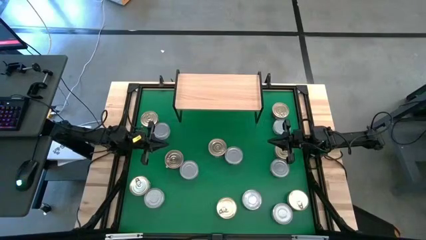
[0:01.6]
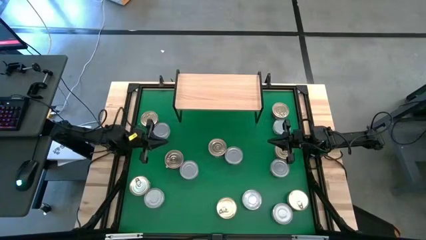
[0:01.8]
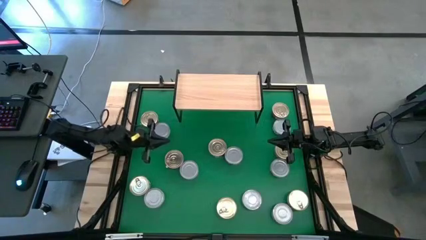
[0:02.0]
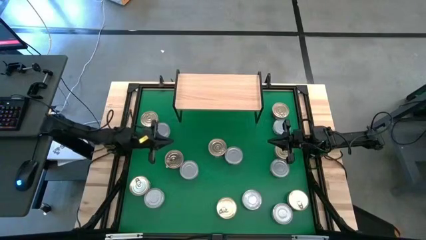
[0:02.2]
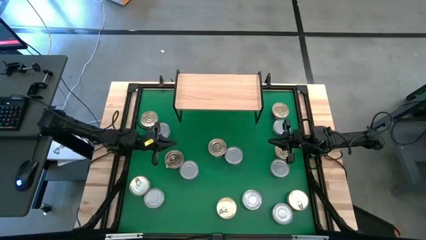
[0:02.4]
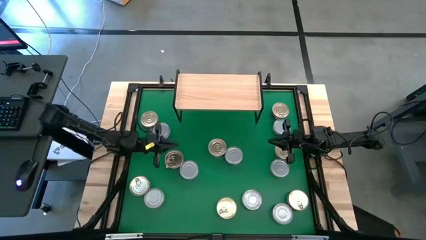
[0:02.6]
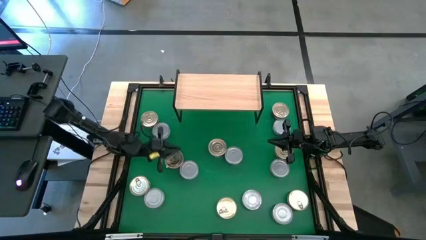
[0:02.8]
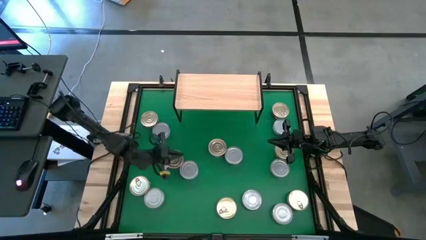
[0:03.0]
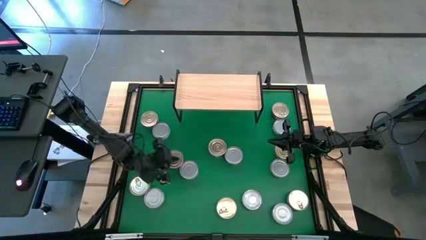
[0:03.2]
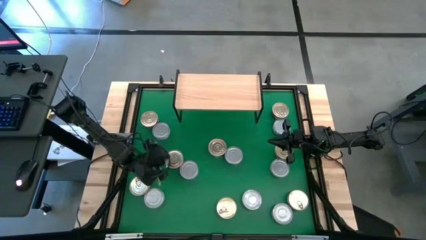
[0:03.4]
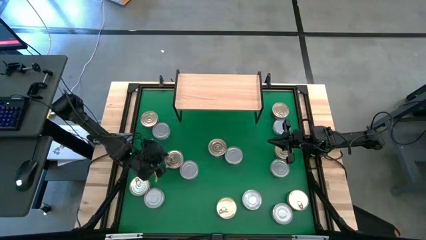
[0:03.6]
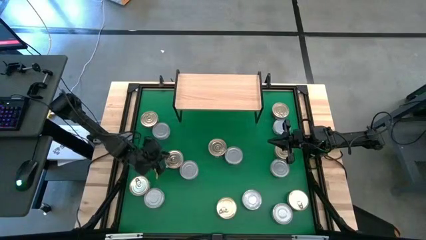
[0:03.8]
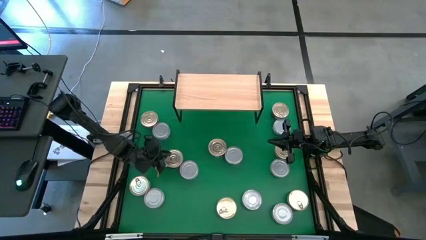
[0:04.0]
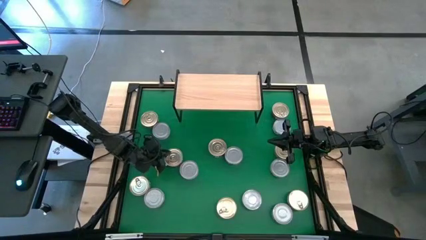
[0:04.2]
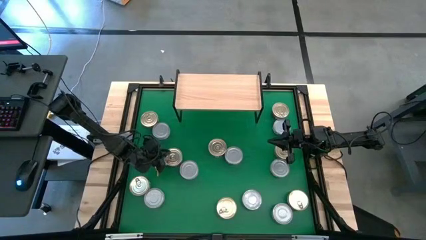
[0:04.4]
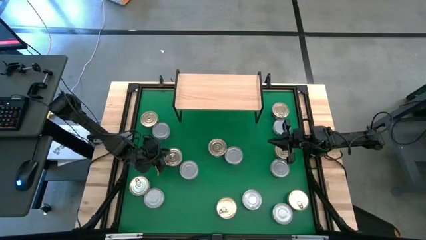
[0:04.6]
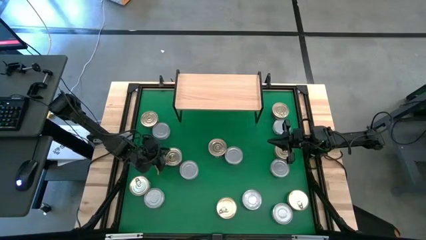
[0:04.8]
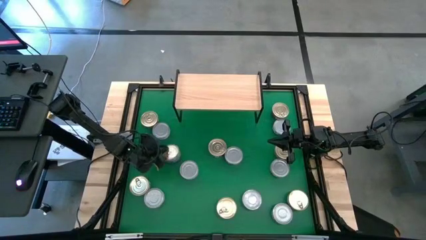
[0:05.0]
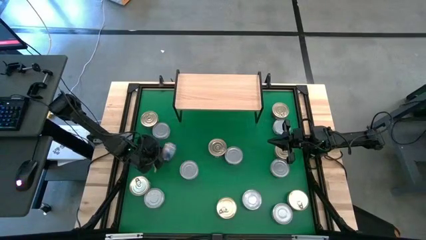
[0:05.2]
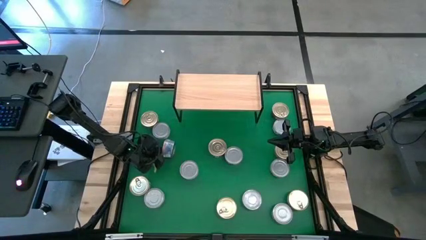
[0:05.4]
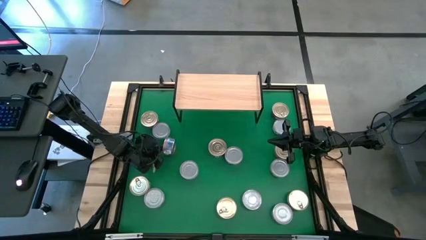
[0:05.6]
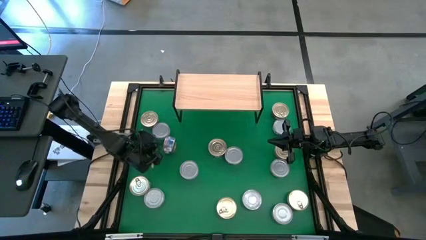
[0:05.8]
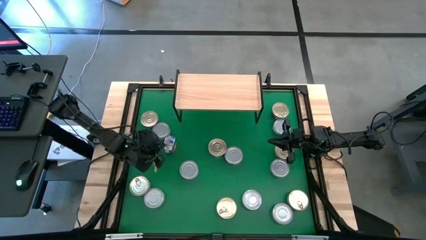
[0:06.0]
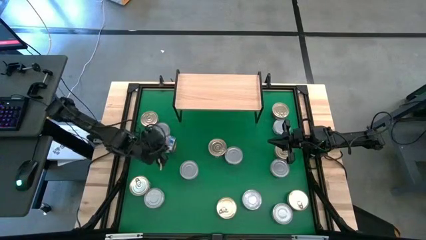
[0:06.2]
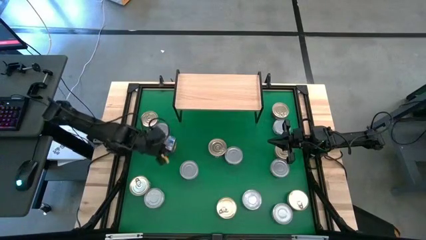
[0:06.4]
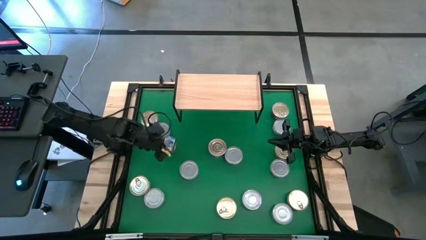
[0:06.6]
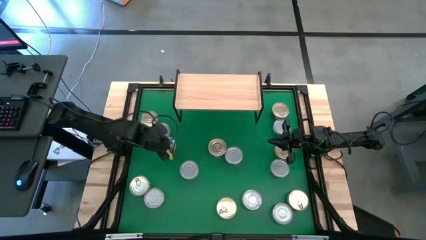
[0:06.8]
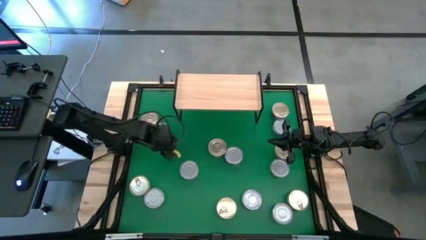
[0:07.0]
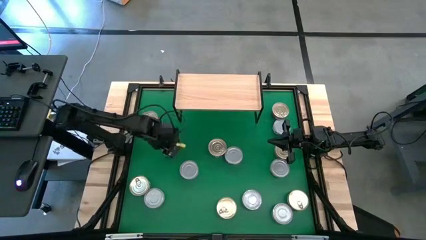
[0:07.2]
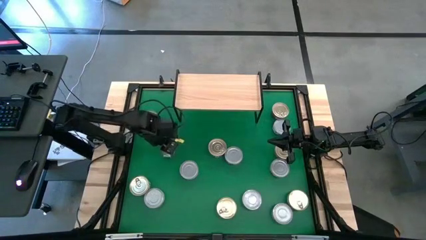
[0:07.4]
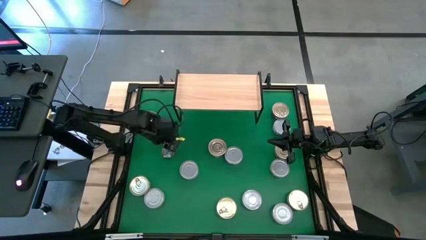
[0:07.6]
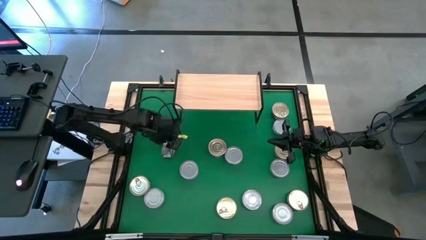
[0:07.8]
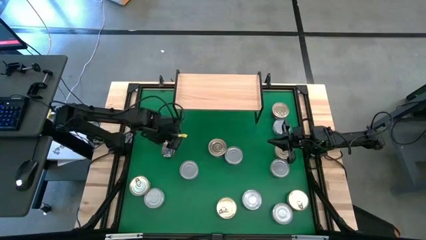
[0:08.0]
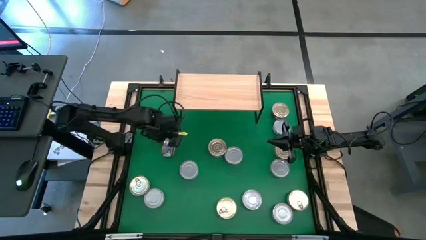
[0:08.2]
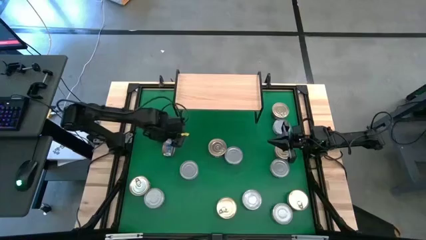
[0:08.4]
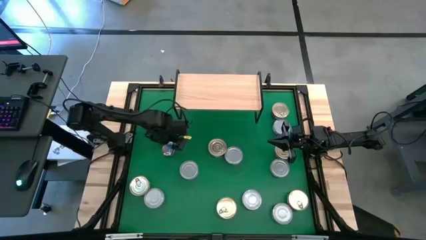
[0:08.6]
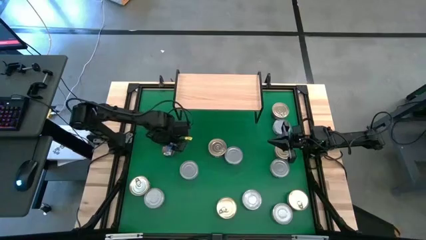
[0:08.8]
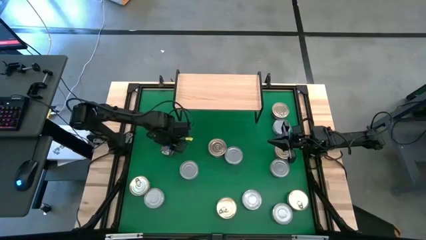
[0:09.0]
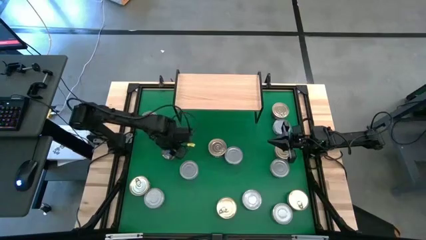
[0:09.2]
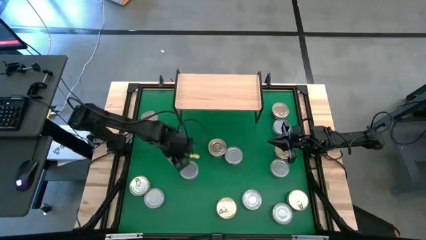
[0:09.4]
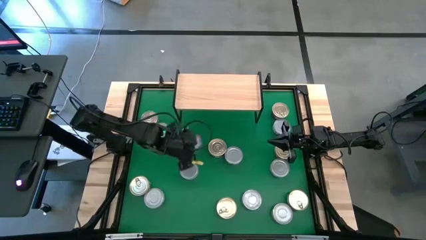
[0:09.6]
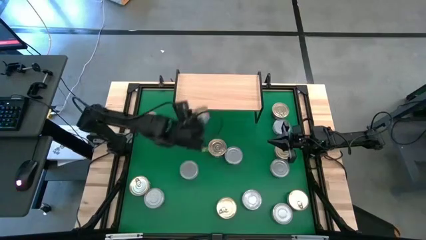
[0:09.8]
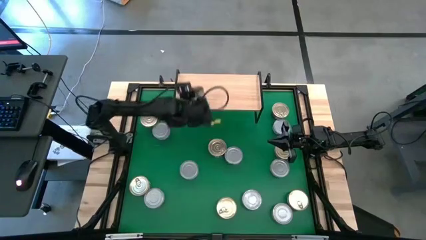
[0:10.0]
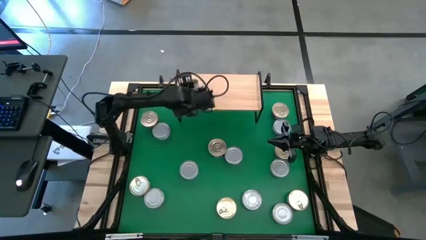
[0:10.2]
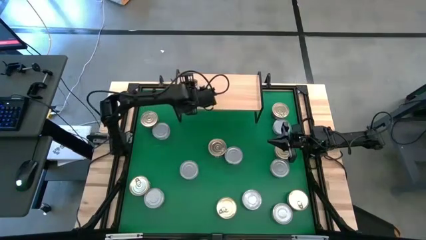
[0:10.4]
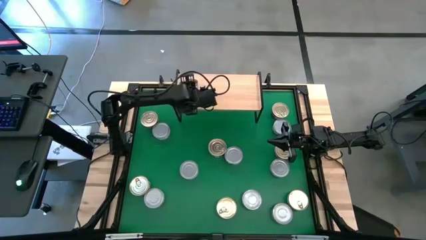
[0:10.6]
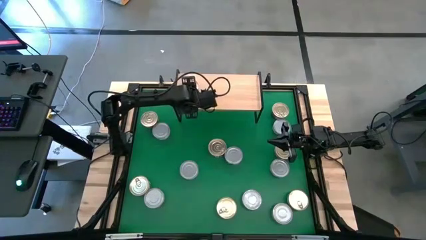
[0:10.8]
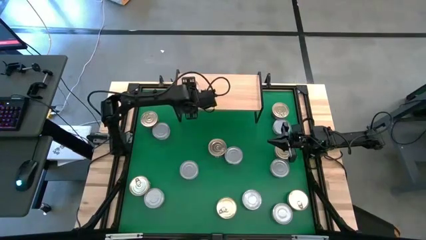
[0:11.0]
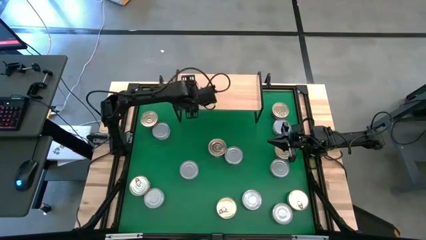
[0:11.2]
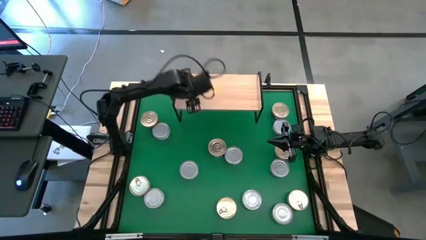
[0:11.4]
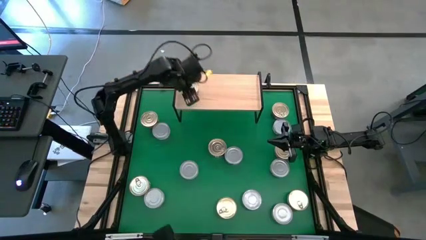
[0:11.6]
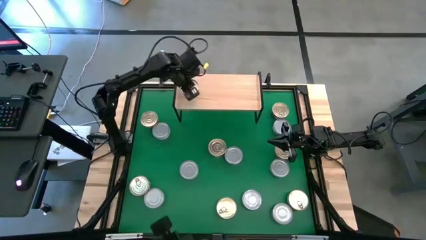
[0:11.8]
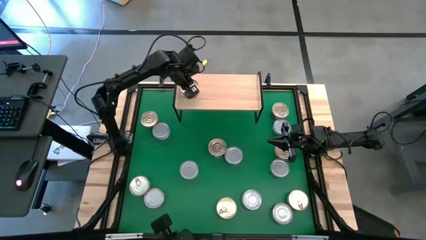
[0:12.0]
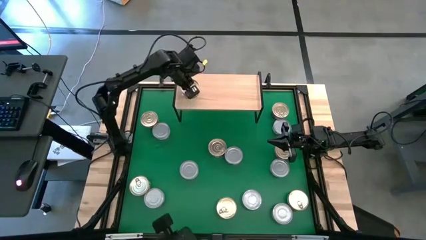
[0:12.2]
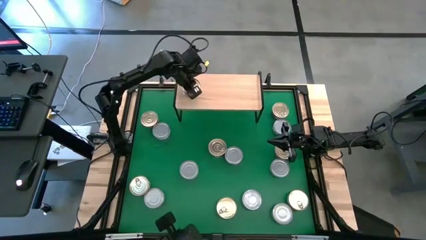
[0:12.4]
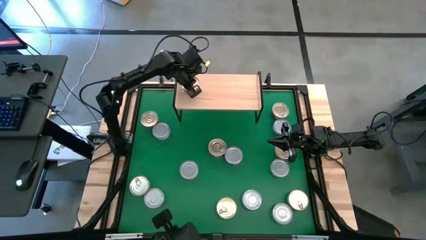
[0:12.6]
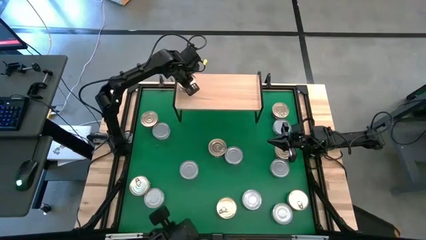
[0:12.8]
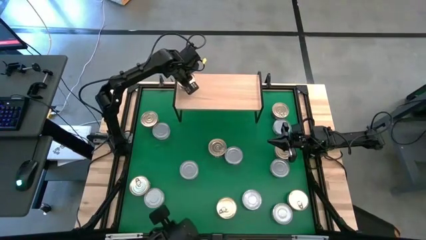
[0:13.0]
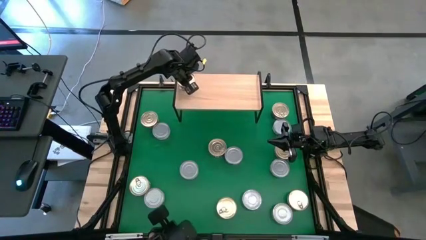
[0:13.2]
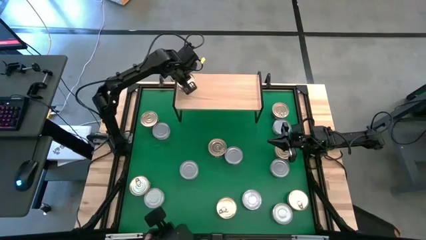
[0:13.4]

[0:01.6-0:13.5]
Task: Stack canned seafood by type on shelf
Put the blue tuna can on the shelf

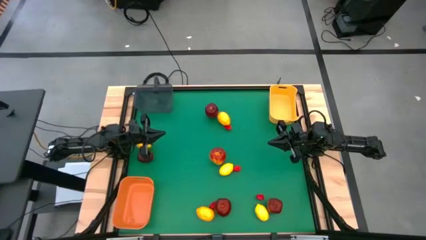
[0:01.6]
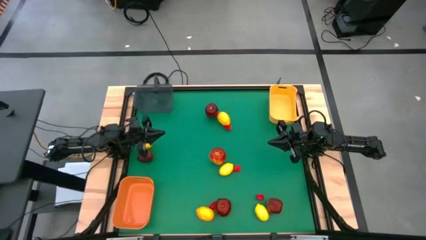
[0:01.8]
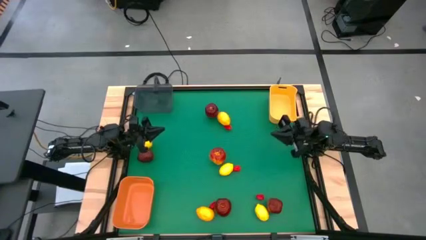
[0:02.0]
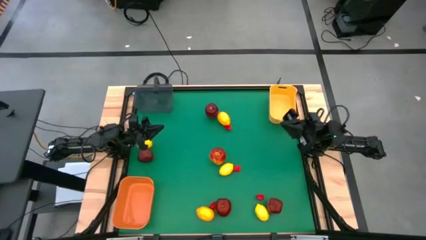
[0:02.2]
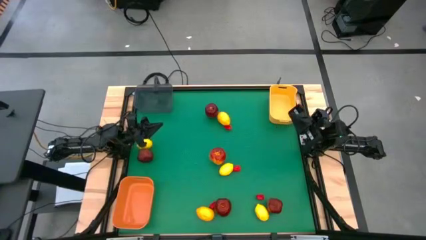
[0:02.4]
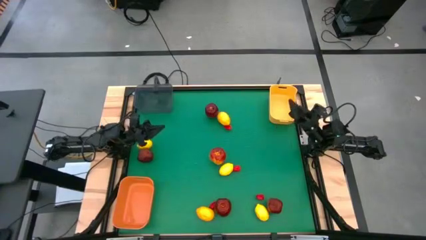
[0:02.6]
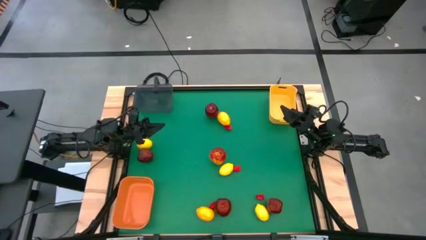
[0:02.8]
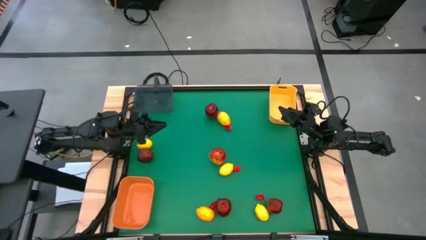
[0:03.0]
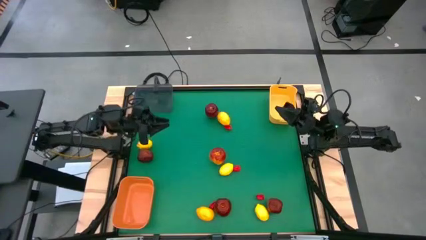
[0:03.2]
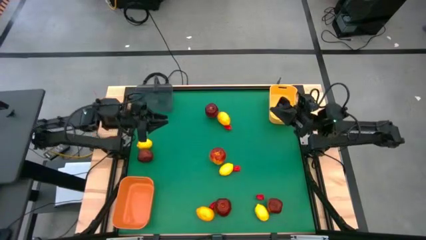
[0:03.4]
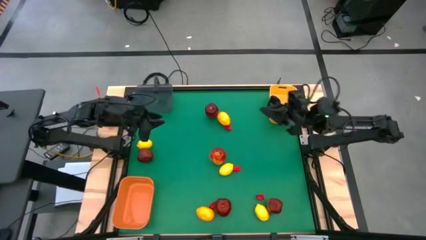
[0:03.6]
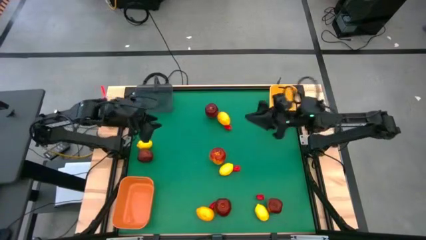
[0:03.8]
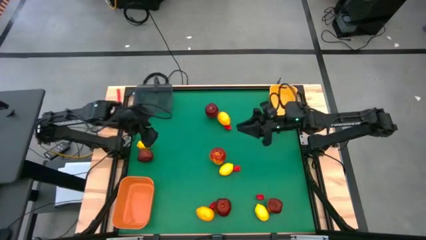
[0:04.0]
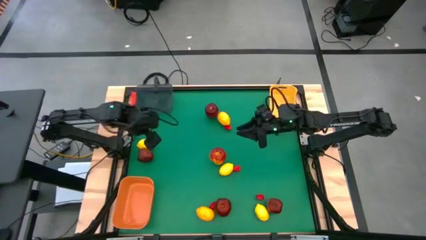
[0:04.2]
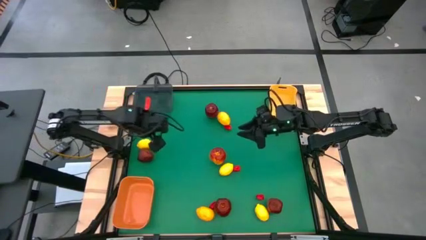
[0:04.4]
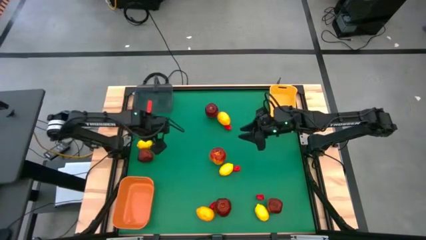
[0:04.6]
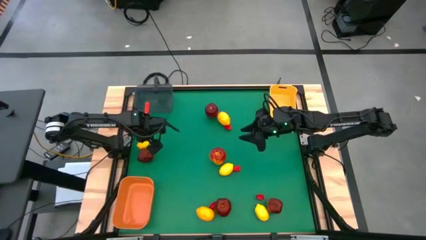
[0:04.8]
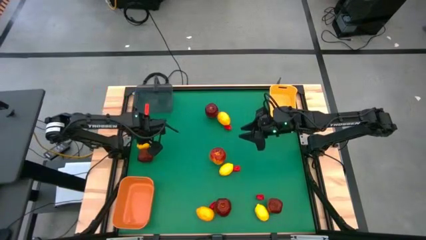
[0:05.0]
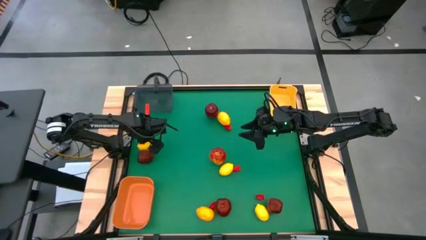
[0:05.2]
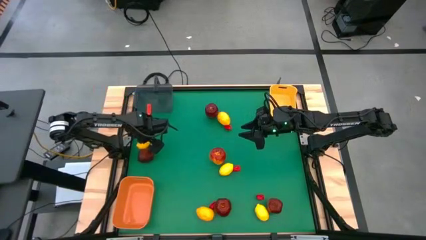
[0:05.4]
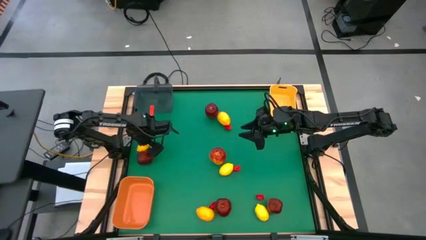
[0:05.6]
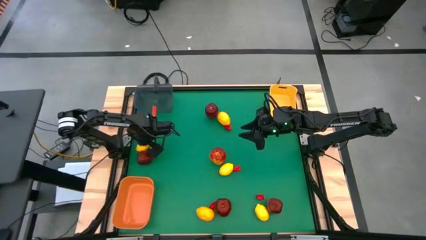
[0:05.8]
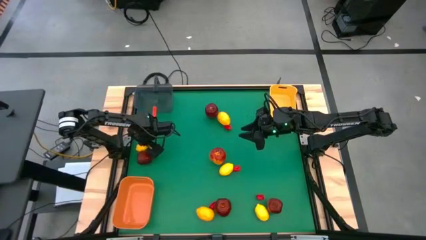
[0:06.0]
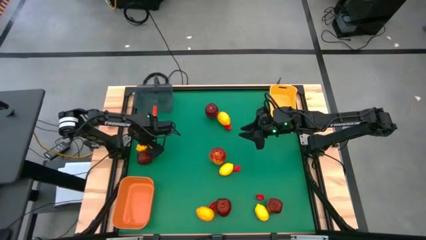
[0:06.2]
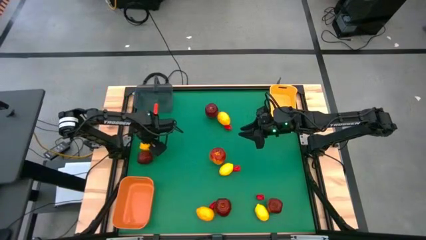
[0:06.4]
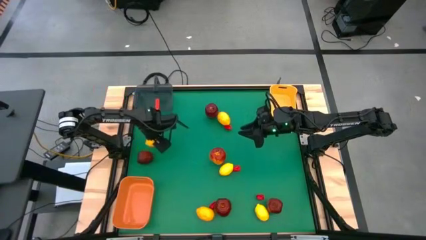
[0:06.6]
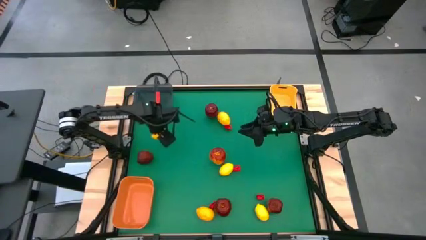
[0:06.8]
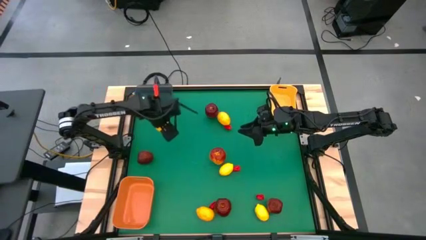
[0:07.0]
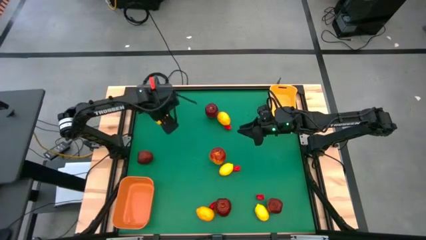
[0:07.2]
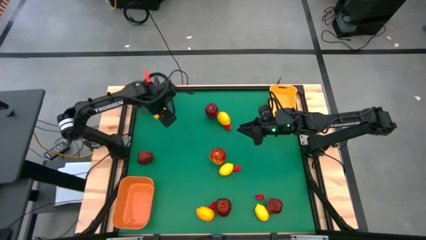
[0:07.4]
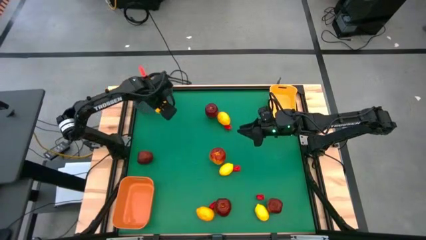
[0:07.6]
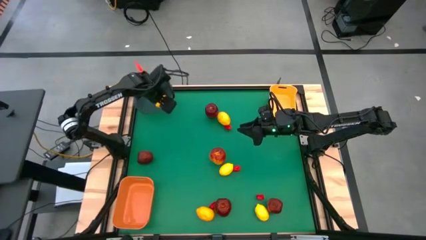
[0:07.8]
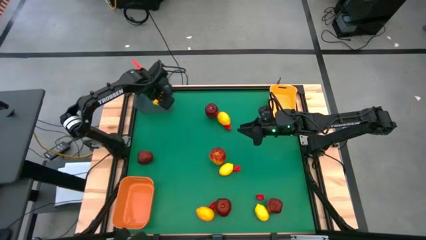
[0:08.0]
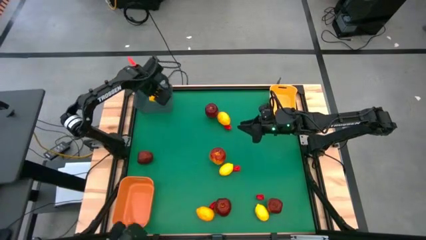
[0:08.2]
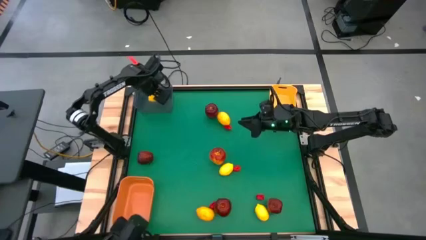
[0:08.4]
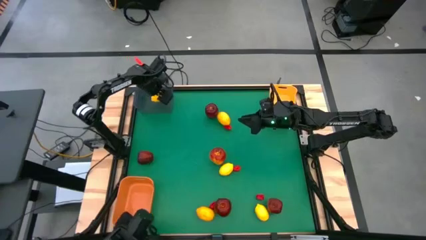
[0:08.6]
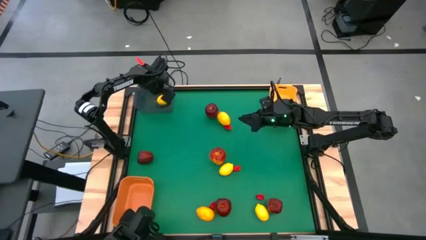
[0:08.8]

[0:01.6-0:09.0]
Task: Sort produce into baskets
Put the center-left lemon into the gray transparent bin
